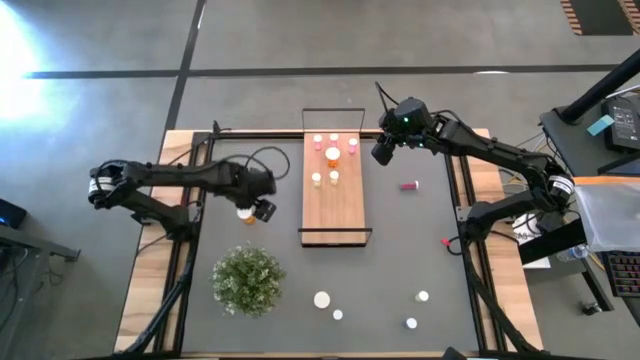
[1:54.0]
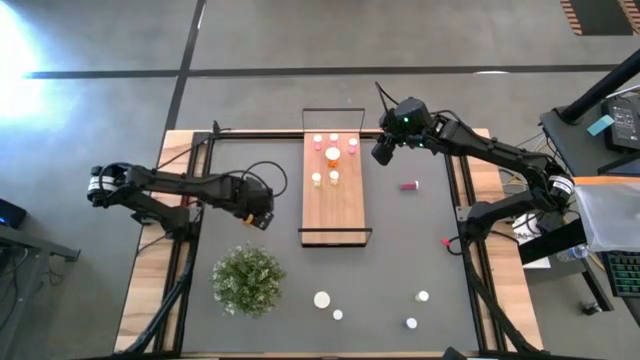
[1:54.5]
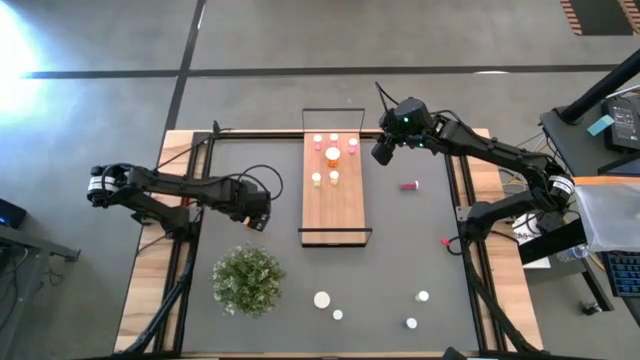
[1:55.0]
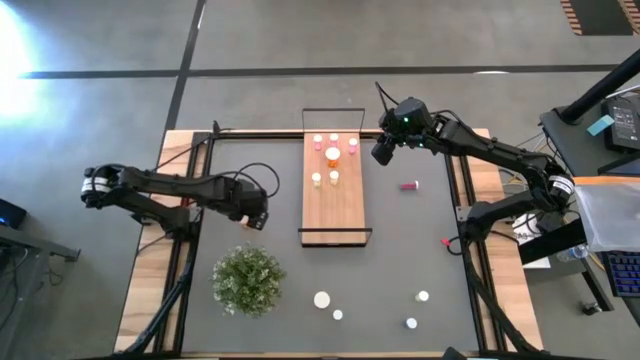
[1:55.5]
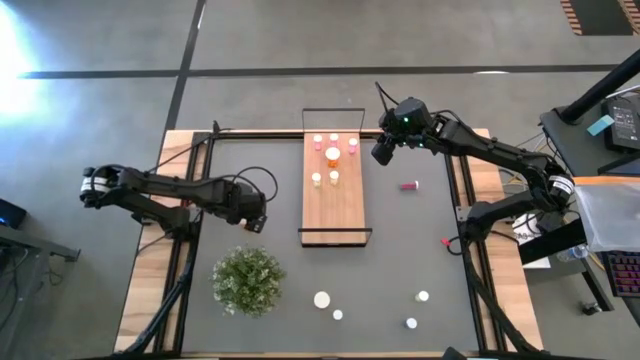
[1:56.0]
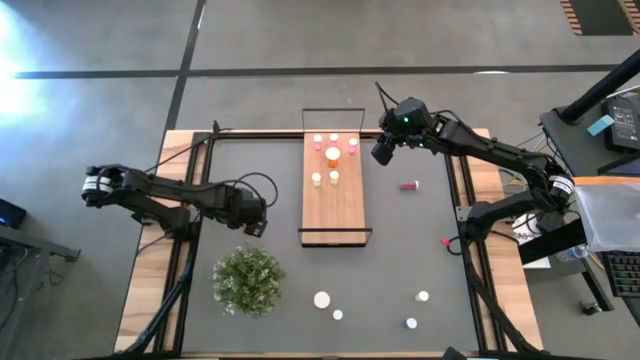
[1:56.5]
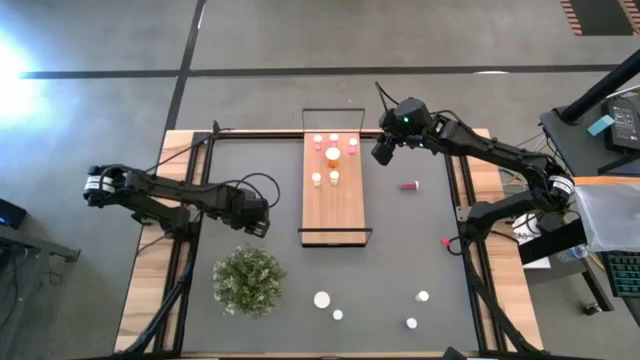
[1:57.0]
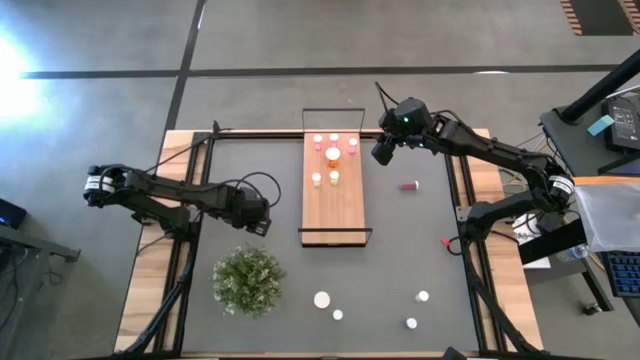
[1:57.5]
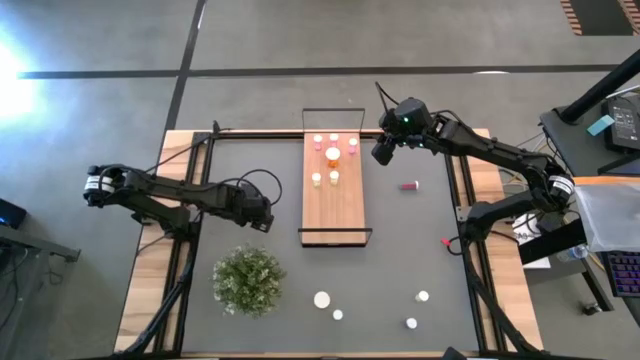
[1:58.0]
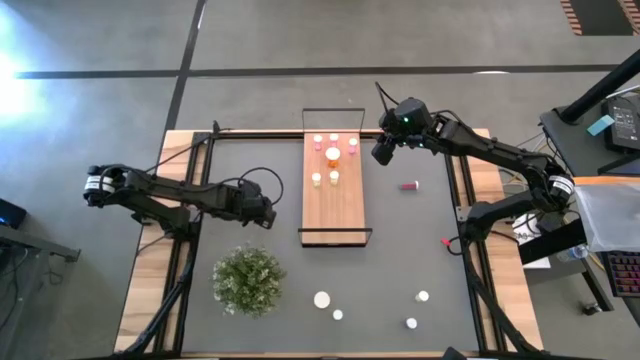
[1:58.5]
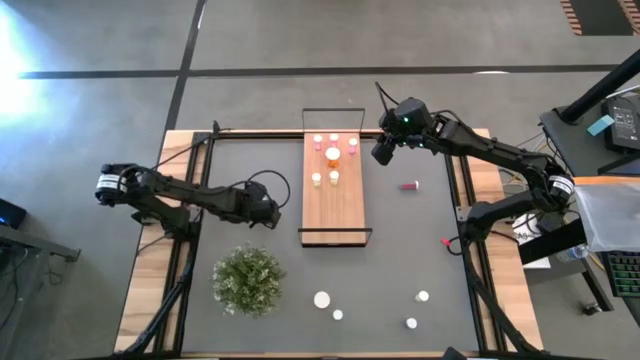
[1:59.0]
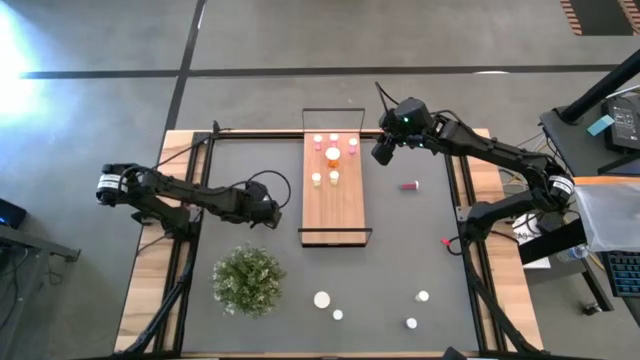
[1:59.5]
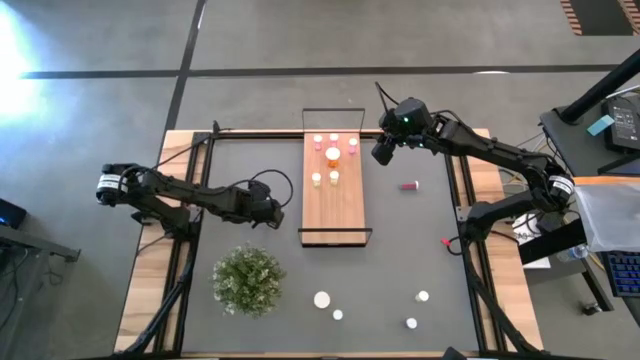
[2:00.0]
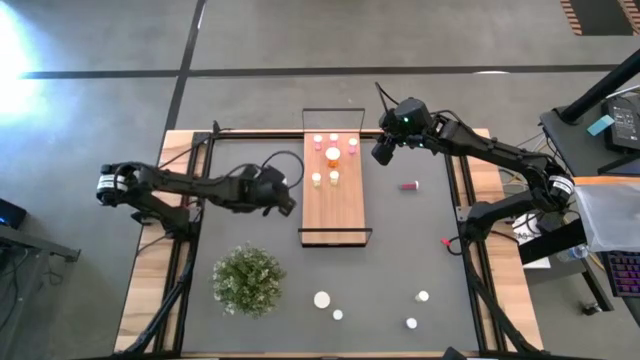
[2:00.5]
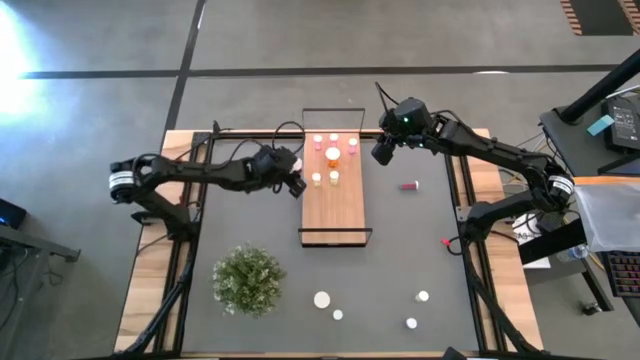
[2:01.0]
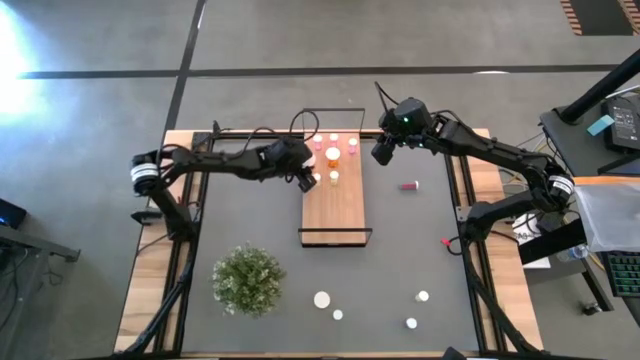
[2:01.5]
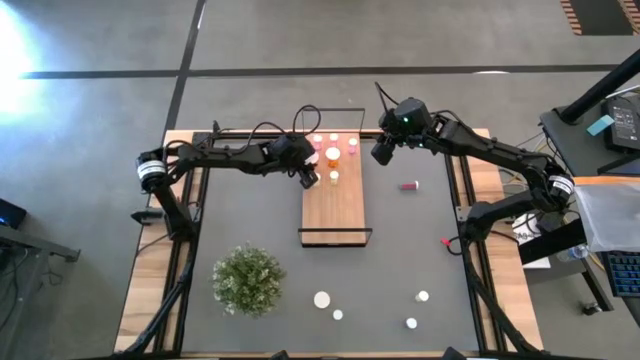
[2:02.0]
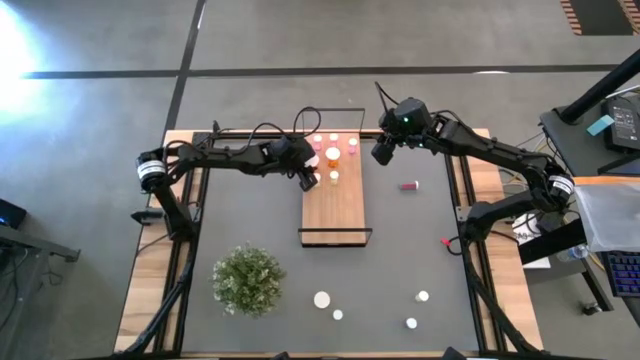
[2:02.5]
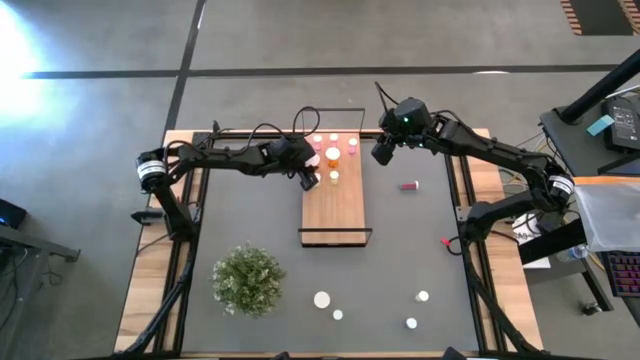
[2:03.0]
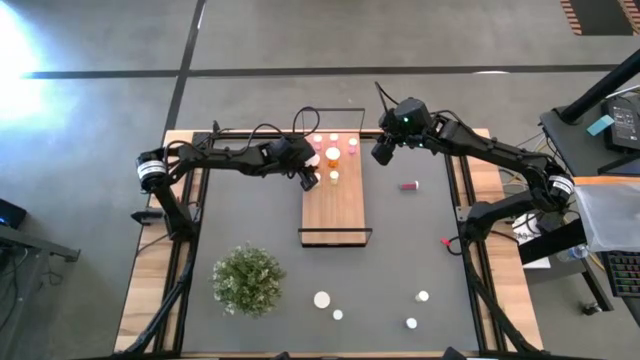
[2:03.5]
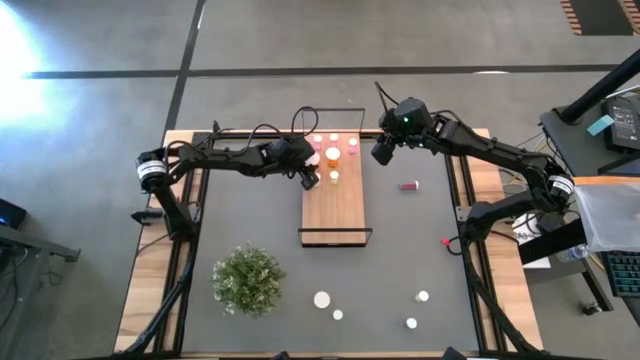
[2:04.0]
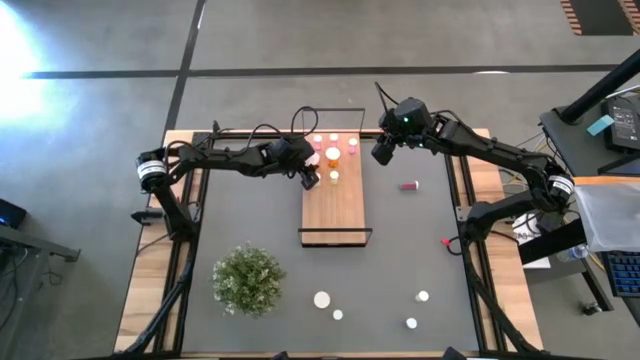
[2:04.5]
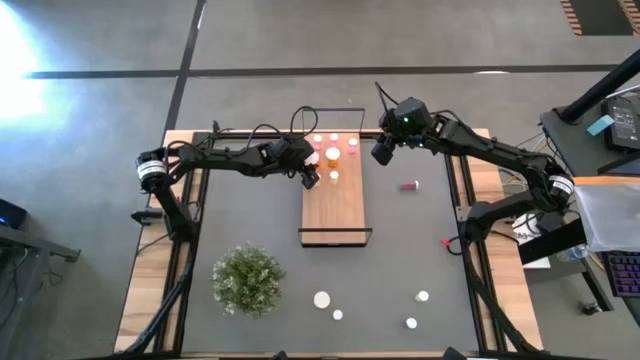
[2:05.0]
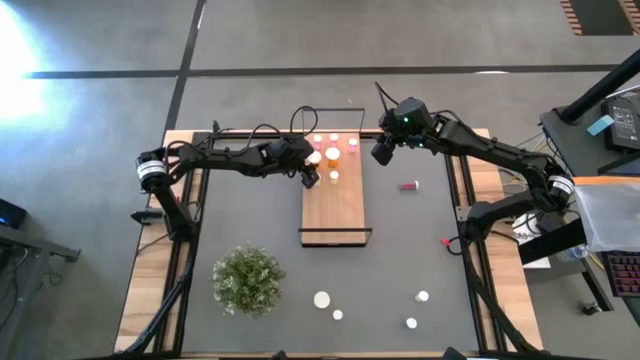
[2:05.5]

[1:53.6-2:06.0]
Task: Pick and place medicine bottles onto shelf by color
Put the top orange pill bottle on the shelf aligned with the other orange pill bottle

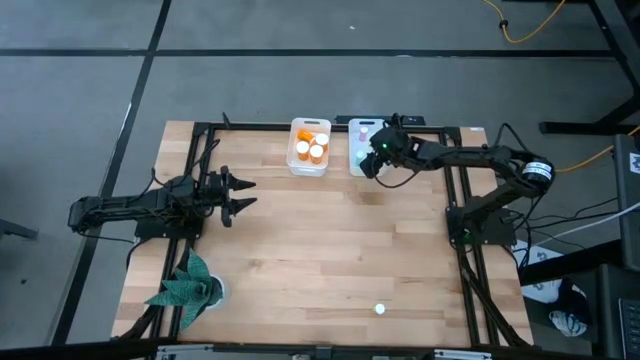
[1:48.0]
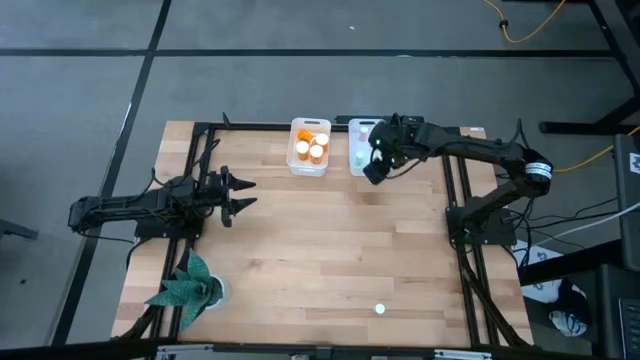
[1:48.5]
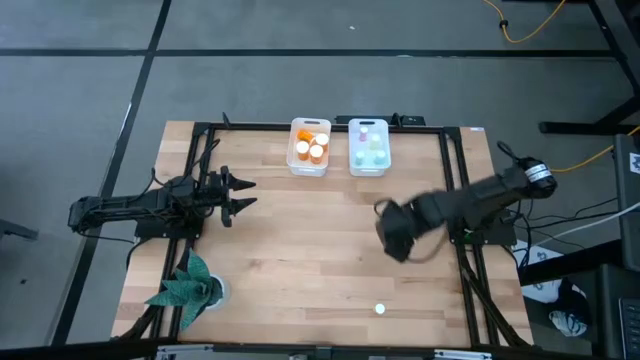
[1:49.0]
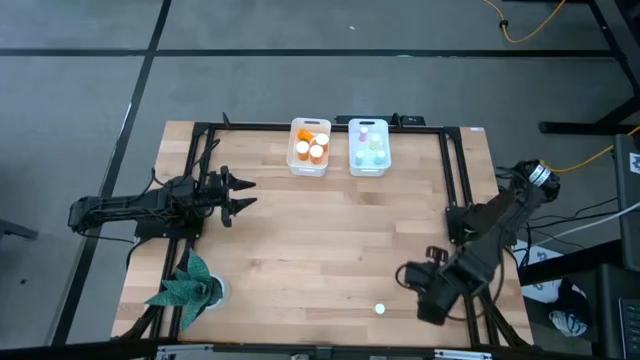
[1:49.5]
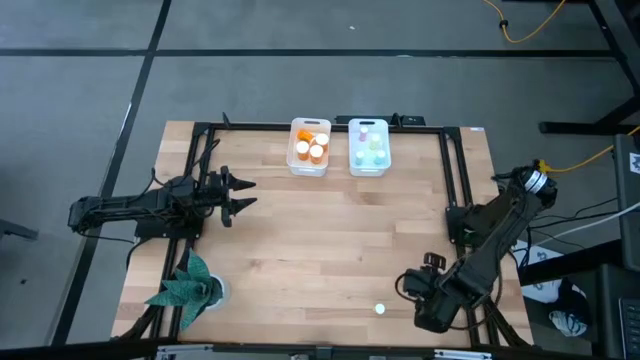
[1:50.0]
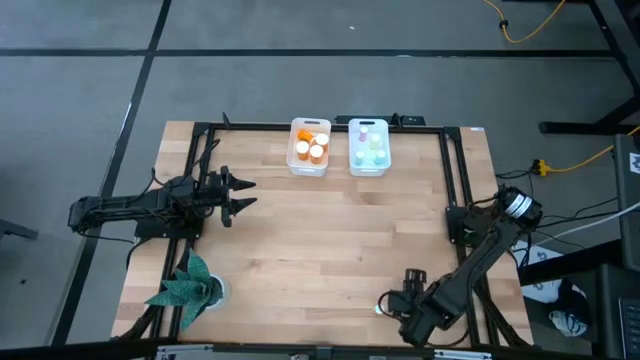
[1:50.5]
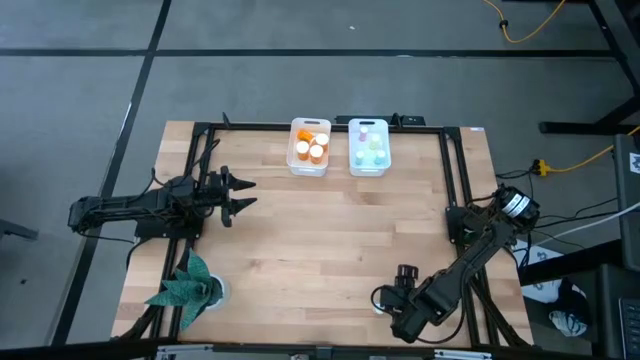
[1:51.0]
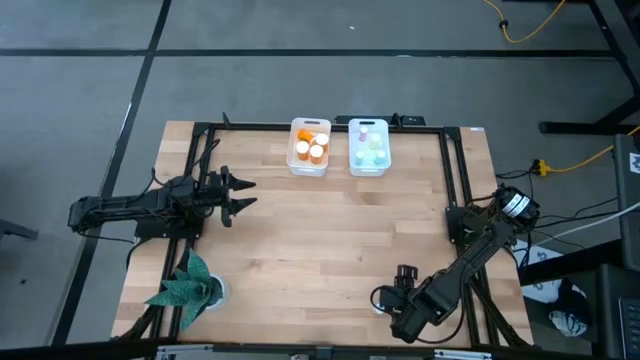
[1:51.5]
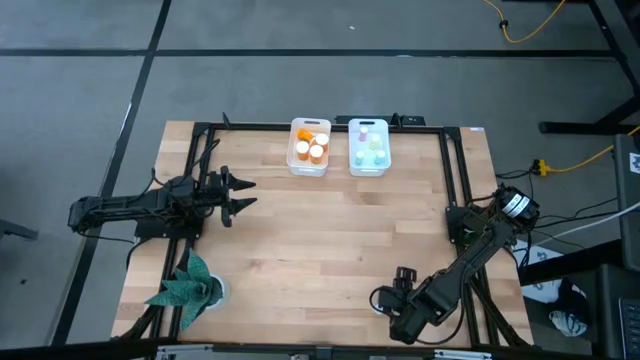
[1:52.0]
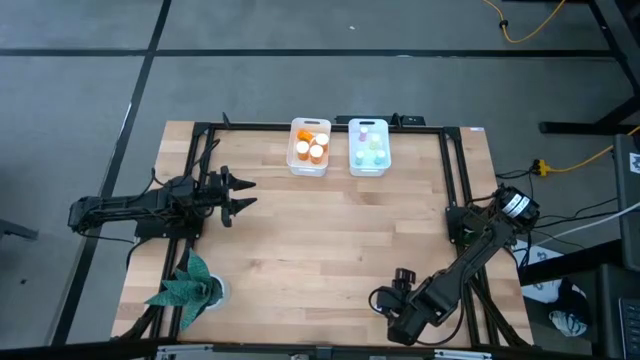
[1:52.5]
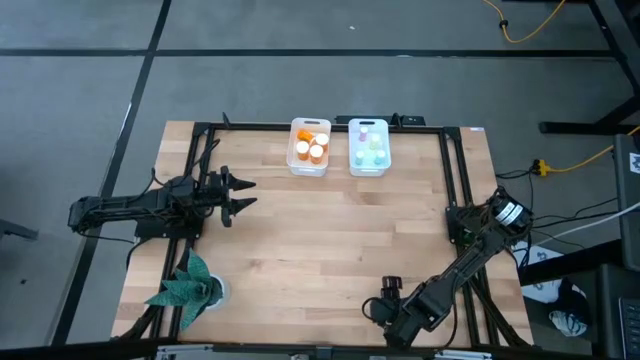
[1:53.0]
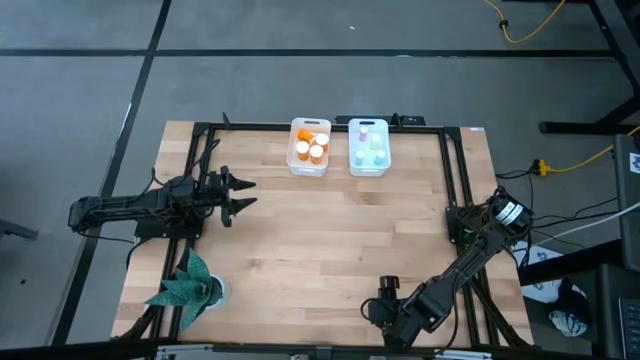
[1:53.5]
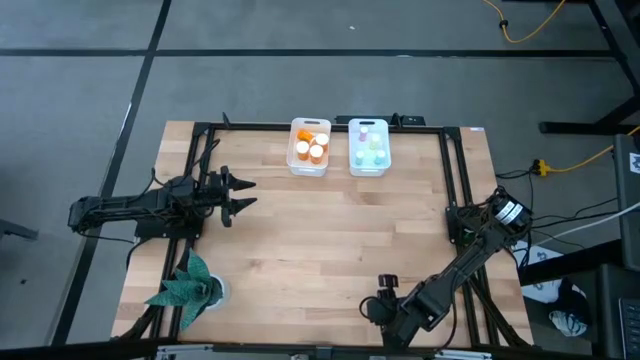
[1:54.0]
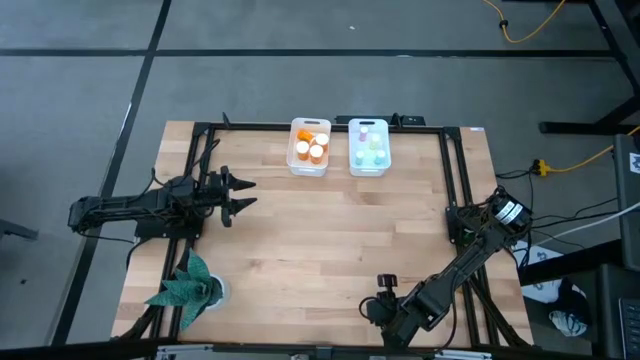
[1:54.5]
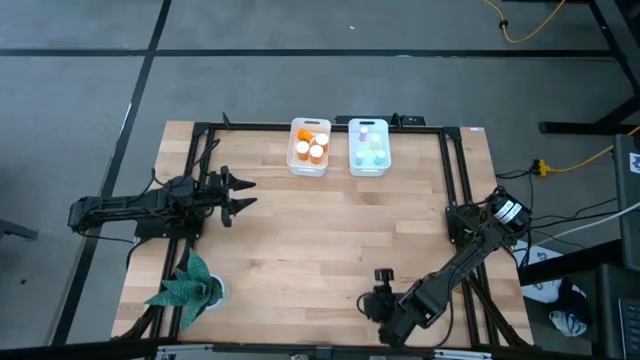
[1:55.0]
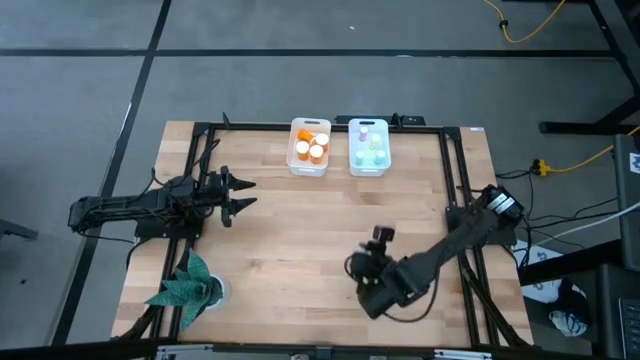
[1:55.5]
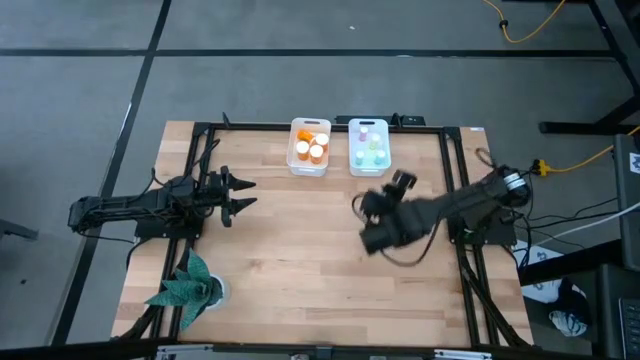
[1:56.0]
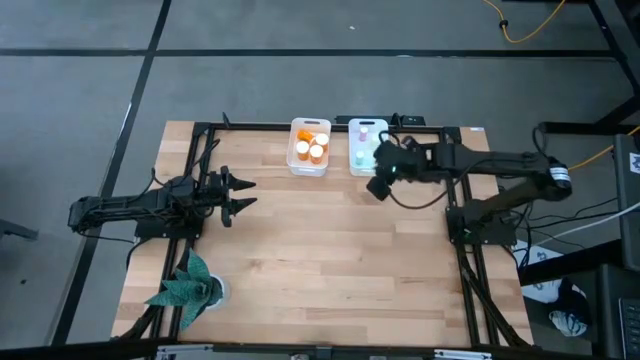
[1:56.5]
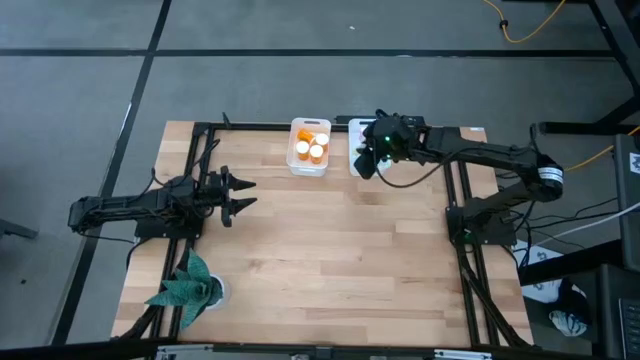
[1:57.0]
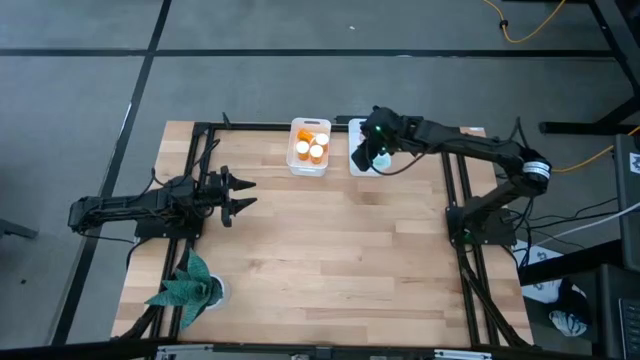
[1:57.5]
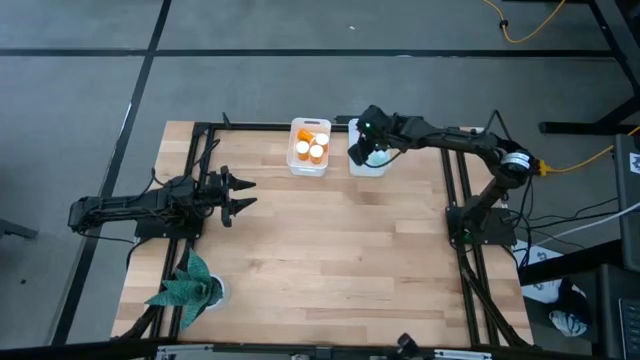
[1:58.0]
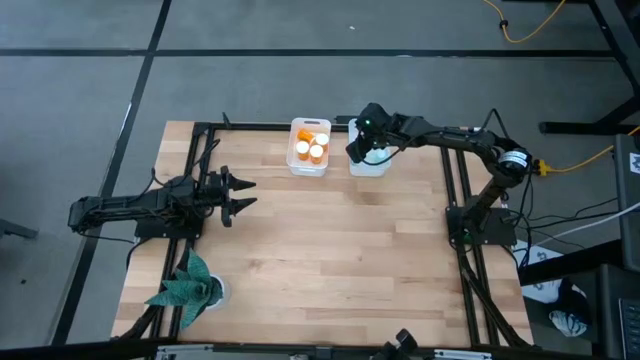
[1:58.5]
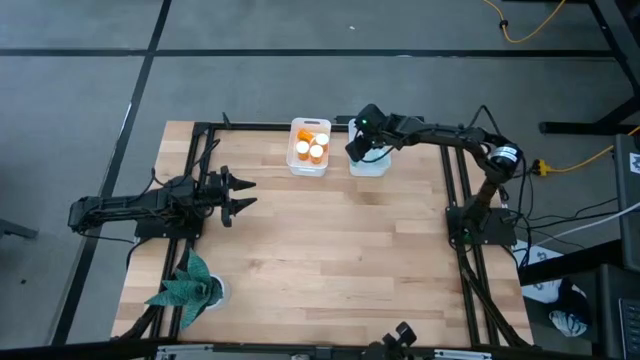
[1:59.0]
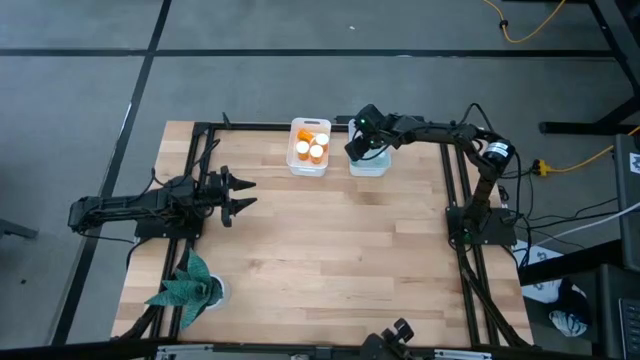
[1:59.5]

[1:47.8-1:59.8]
Task: Pick and place medicine bottles into bin by pill shape (circle, oval)
Put the yellow tablet bottle into the right white bin
